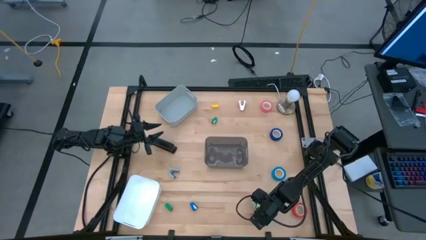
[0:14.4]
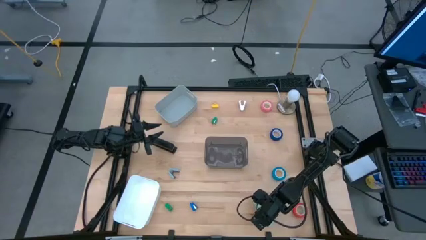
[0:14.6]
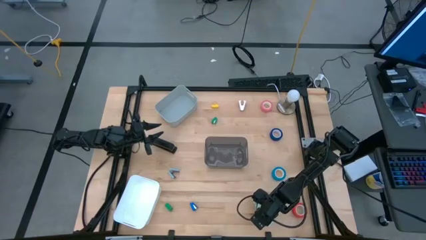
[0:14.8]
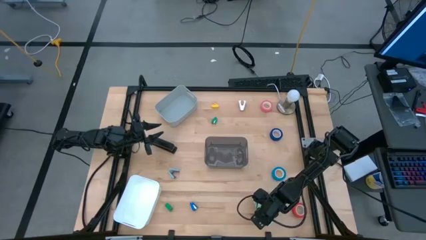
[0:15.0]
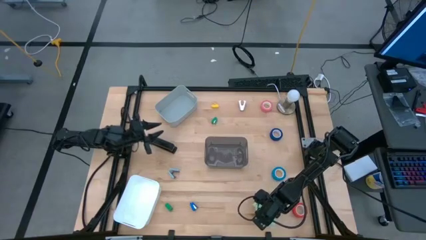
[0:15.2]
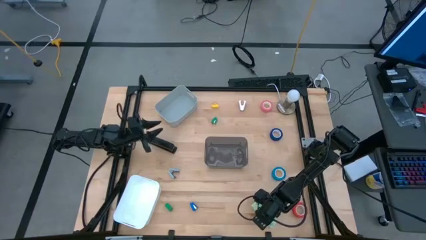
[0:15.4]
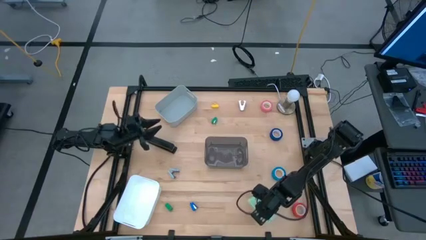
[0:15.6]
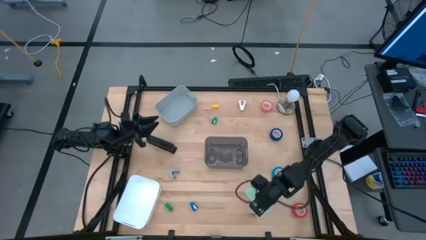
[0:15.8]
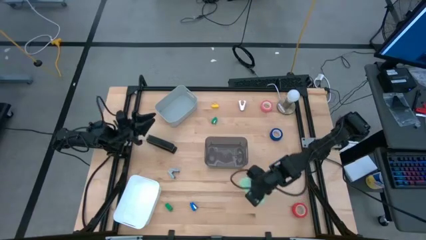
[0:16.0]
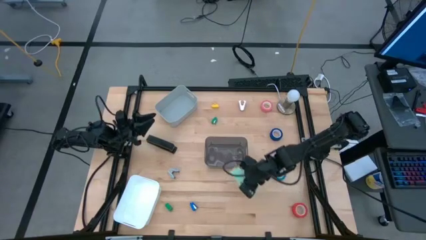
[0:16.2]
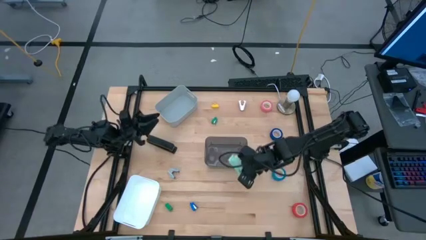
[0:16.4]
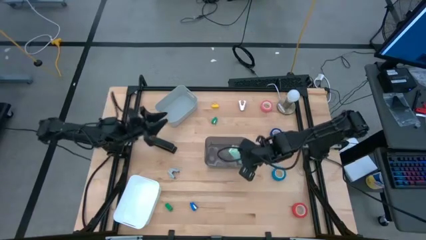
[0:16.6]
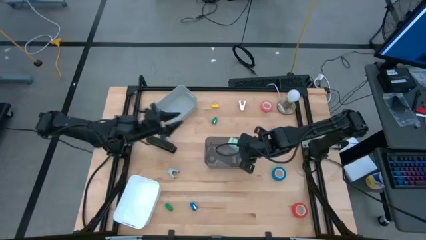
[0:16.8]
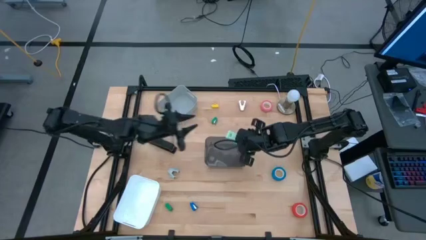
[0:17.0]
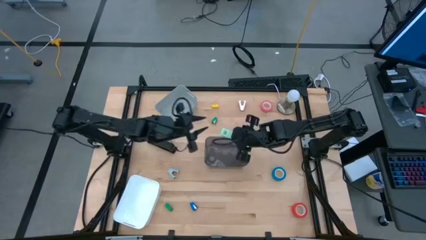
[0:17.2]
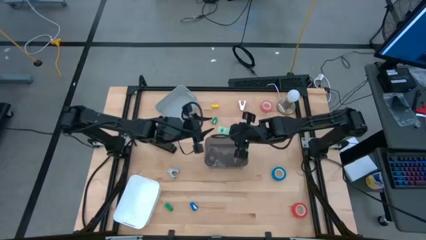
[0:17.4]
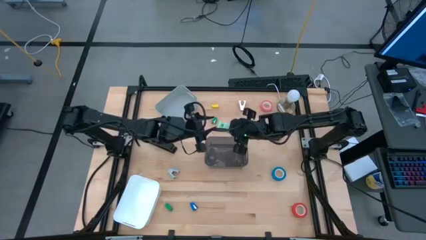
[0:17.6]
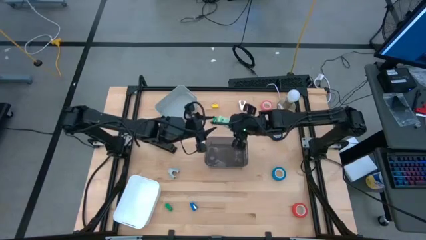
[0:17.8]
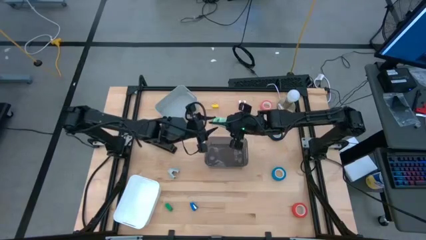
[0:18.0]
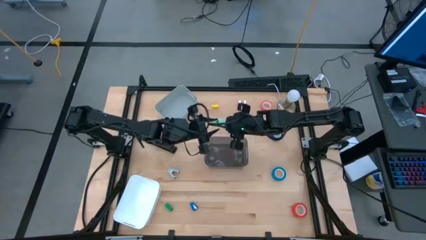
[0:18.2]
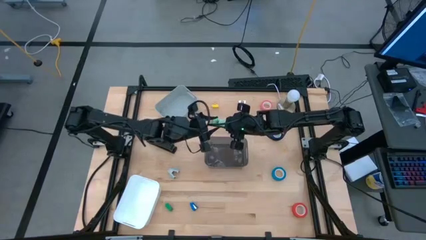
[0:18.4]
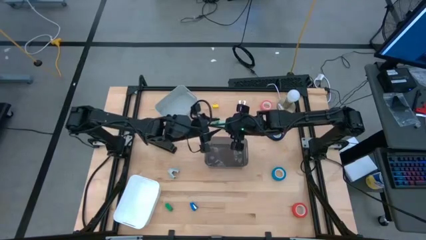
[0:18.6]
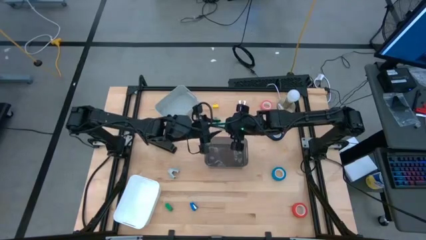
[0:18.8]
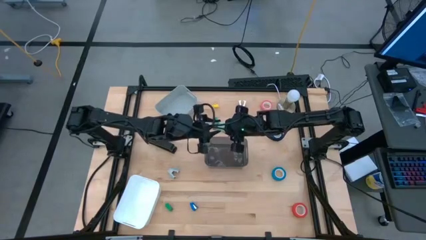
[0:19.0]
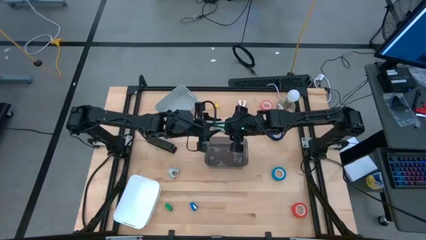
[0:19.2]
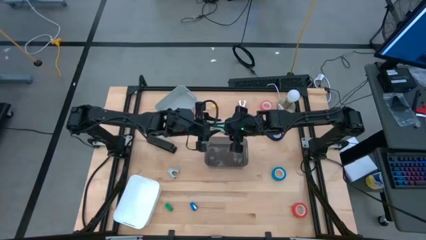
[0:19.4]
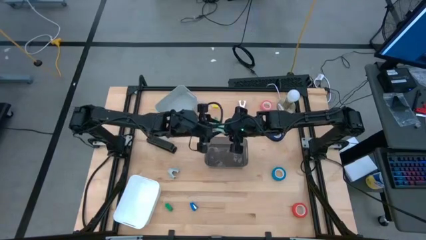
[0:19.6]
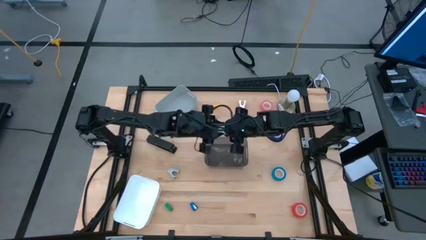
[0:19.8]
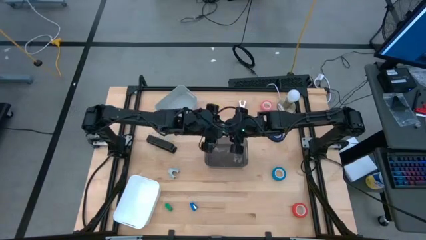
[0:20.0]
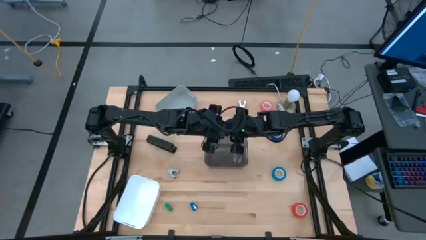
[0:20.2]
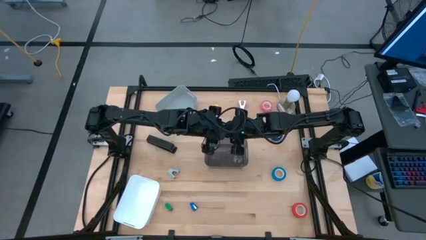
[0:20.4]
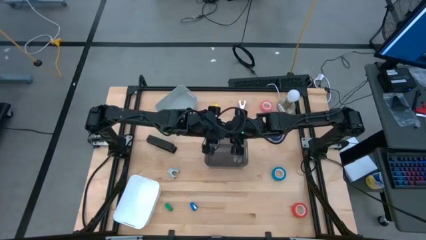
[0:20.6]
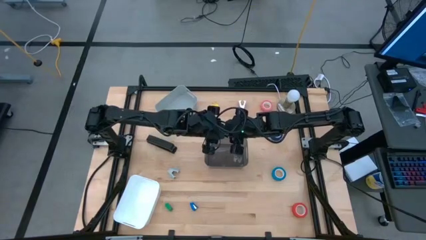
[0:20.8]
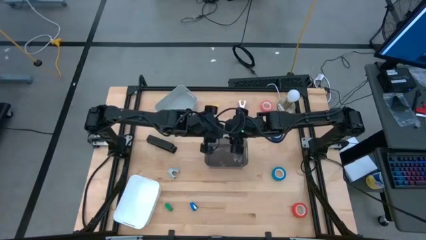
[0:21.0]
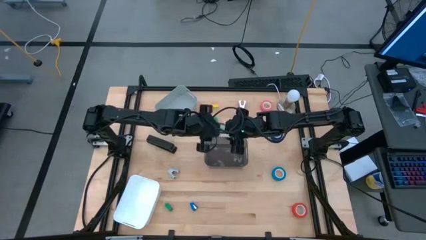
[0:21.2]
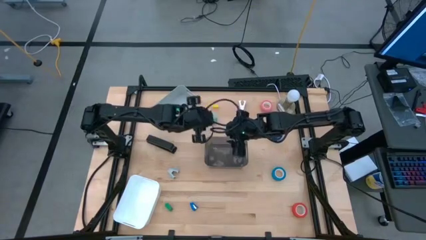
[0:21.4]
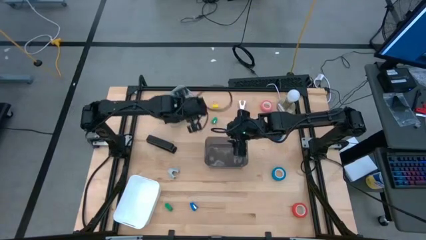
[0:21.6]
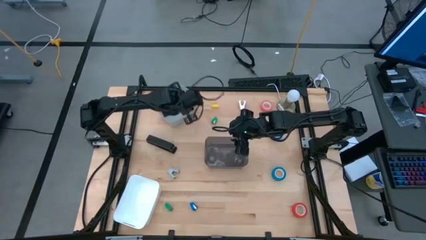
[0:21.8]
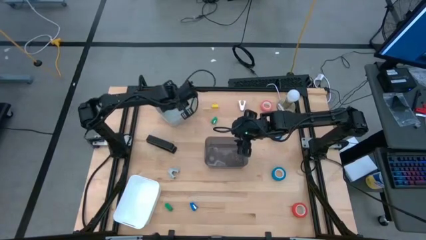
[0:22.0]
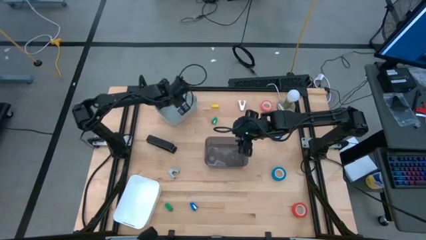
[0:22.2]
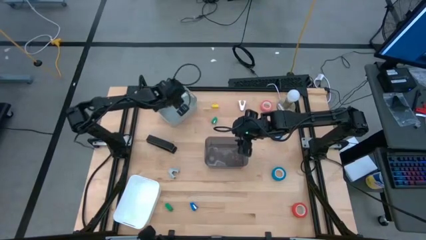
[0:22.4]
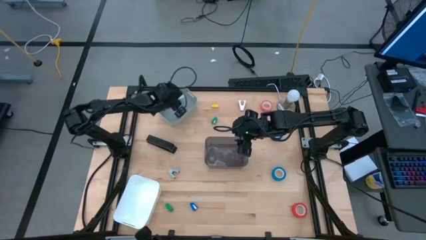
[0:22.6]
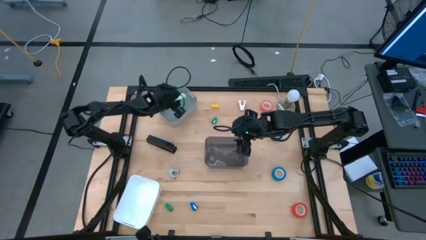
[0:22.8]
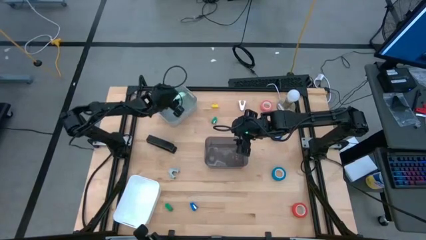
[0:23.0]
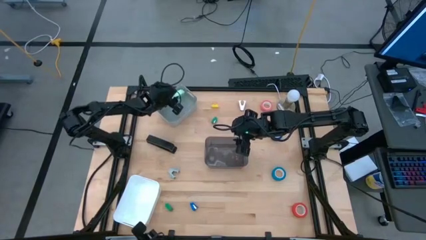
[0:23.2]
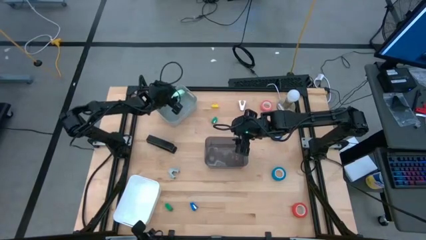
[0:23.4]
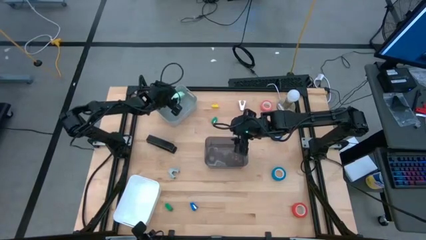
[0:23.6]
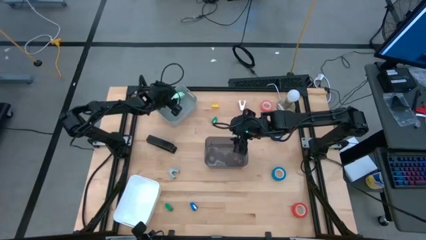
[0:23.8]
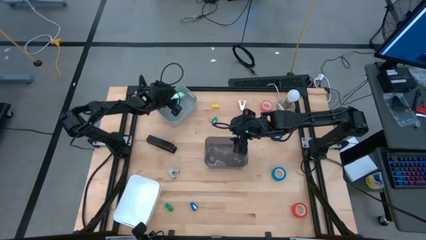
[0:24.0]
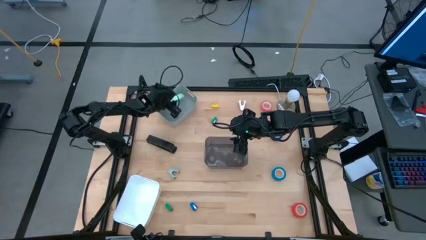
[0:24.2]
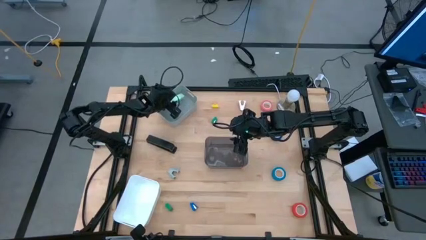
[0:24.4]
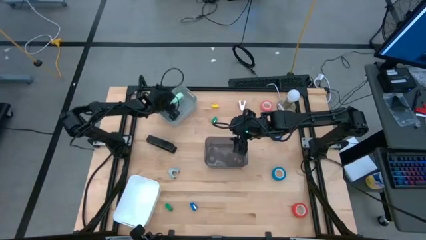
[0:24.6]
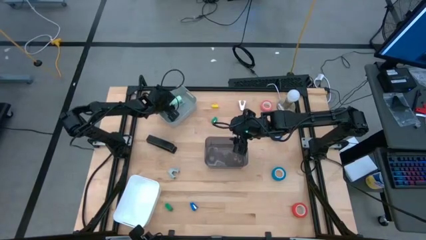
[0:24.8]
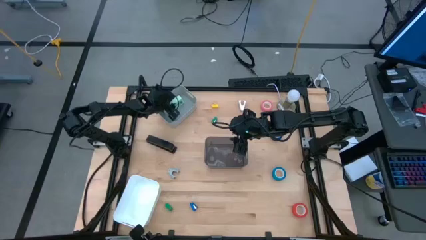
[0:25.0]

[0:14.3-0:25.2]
Task: Pick and place Stapler, Stapler remover, tape
Put the light green stapler into the gray bin

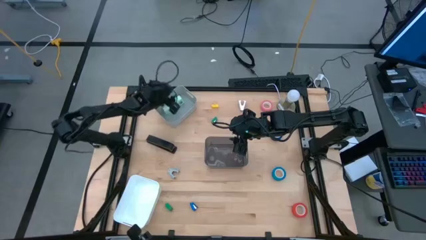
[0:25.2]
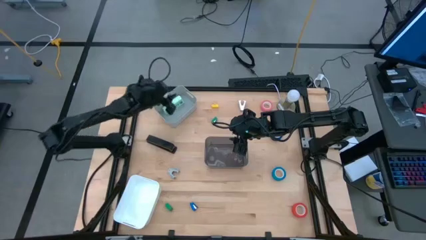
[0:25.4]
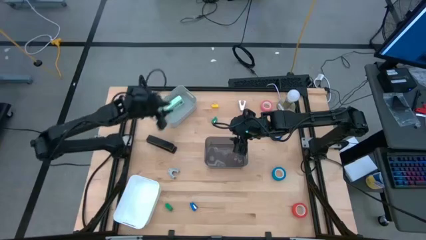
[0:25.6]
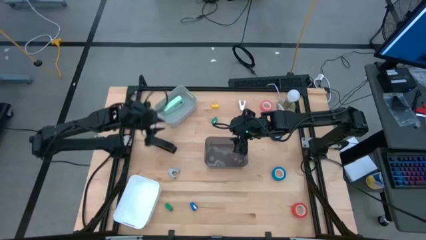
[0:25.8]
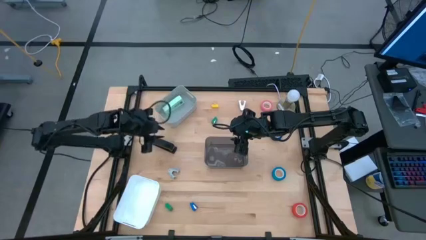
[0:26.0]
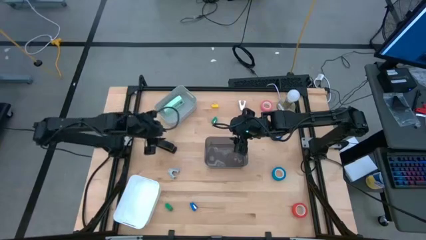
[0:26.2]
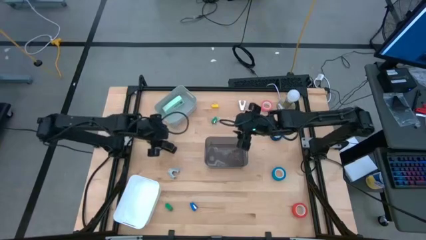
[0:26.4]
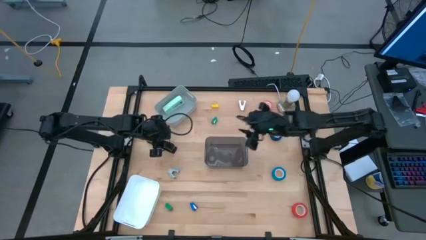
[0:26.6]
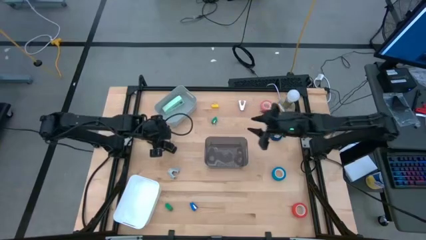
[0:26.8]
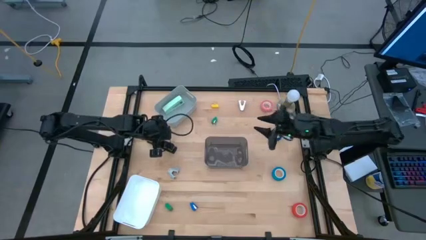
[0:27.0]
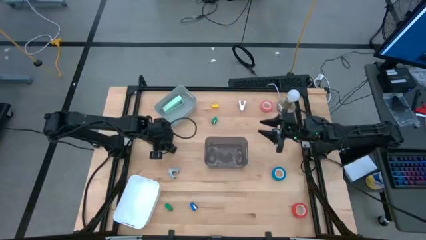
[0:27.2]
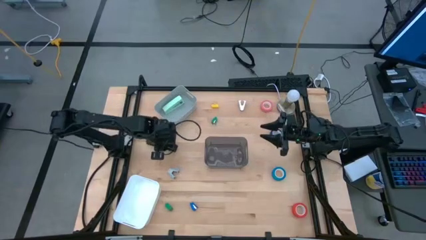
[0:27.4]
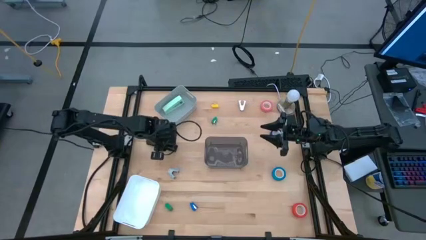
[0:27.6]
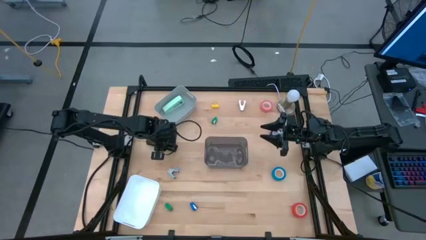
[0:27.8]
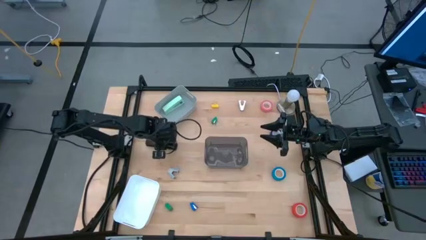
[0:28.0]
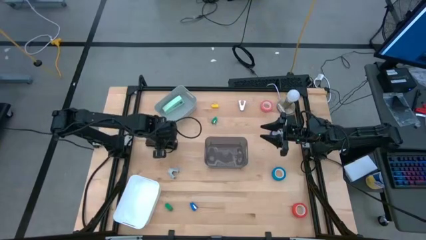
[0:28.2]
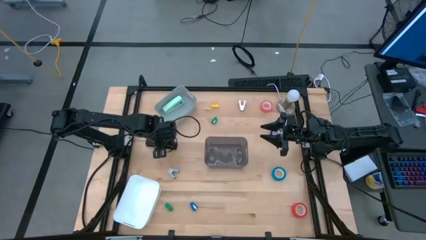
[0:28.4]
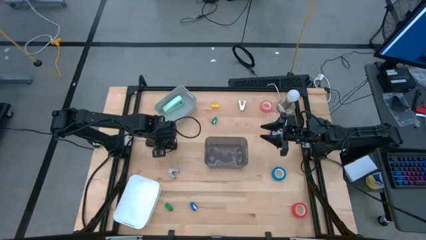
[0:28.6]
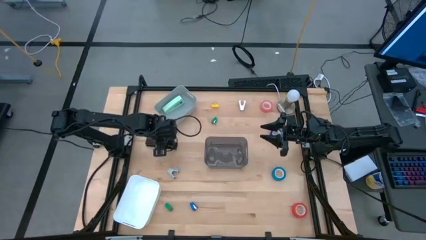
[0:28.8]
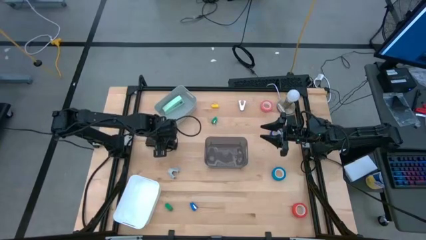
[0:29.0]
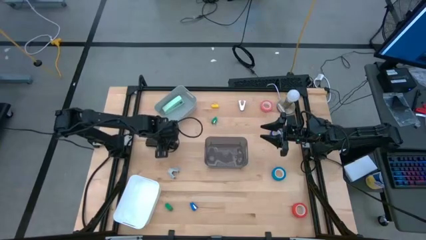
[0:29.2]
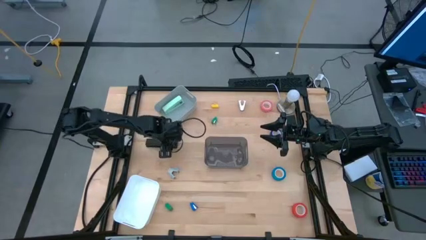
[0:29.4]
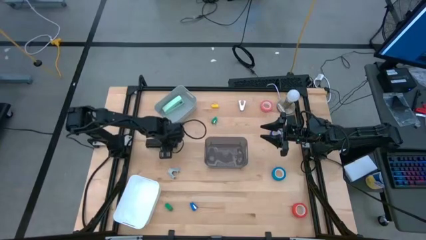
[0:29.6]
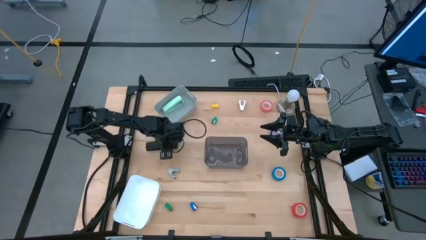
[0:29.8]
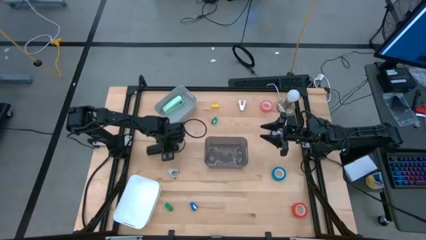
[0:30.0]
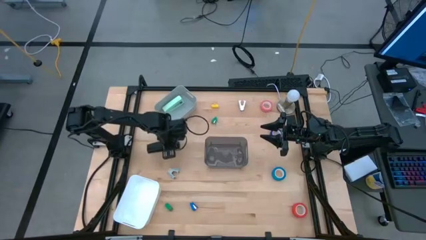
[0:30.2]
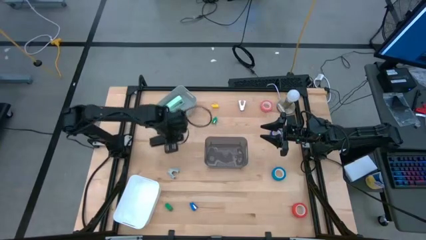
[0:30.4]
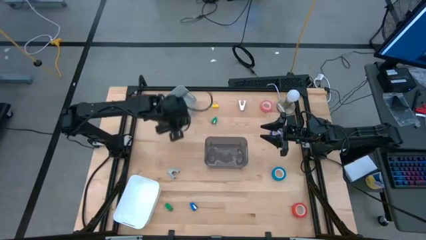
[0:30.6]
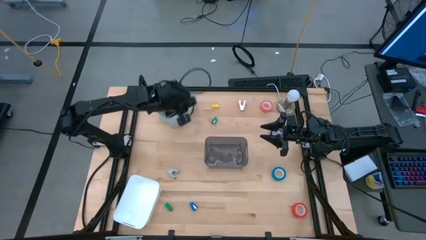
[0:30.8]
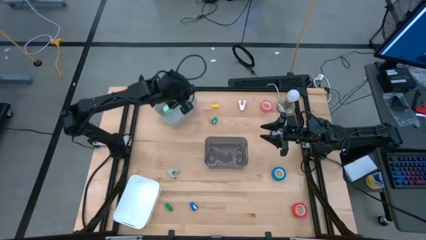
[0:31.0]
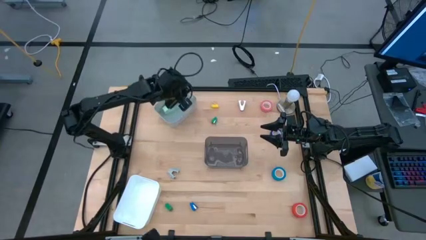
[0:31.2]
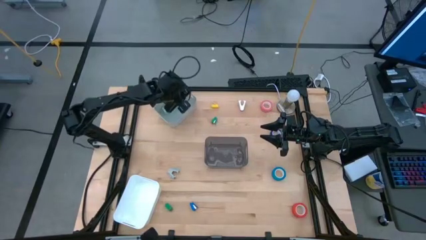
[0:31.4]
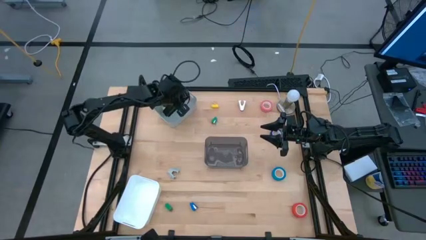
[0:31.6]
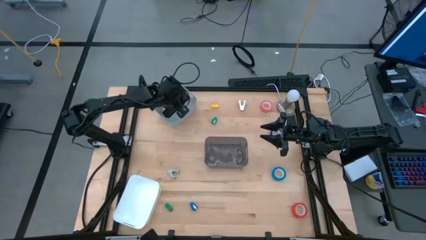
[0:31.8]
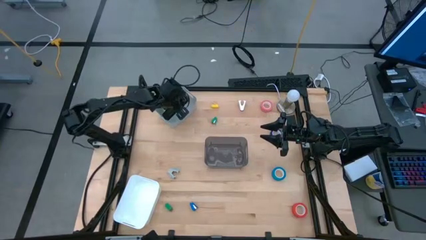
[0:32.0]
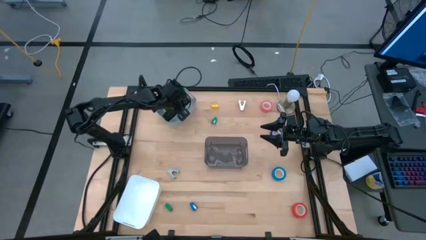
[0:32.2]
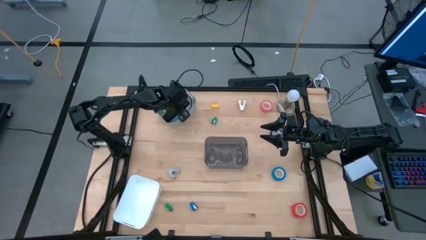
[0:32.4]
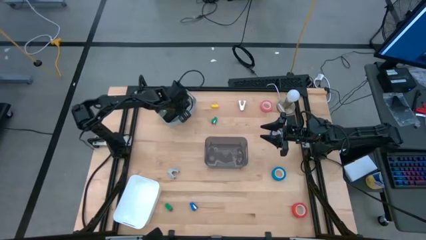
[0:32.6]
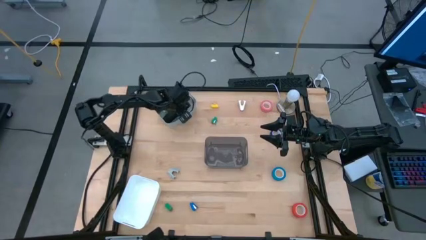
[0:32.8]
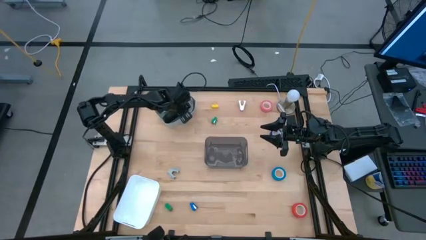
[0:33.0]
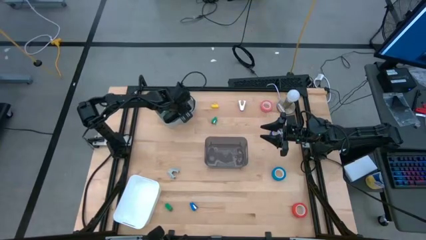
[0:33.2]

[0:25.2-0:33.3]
Put the black stapler into the gray bin
